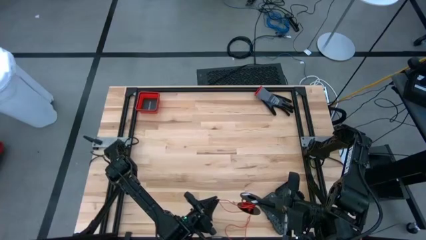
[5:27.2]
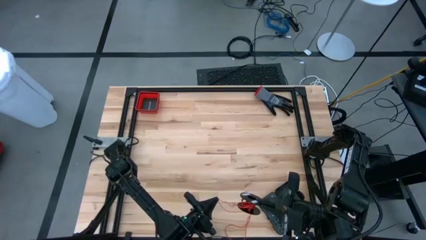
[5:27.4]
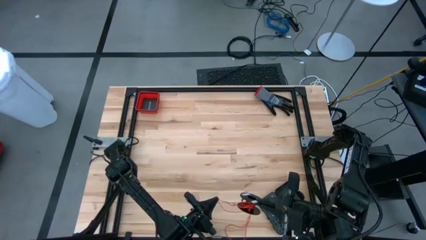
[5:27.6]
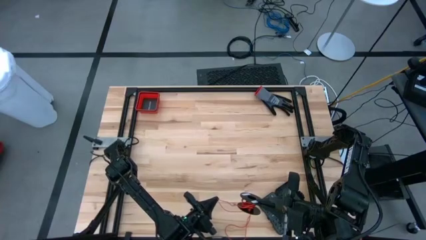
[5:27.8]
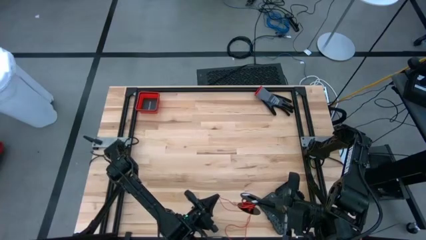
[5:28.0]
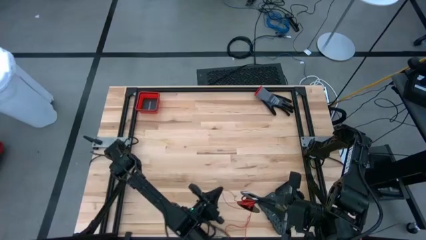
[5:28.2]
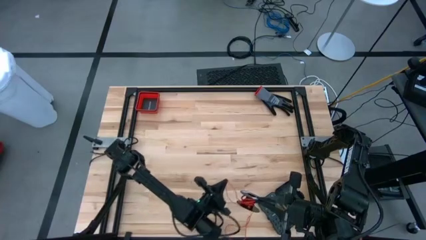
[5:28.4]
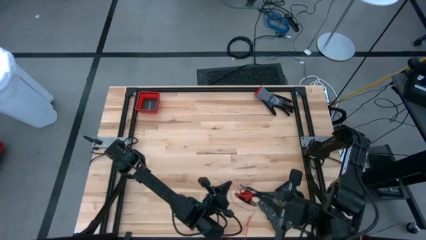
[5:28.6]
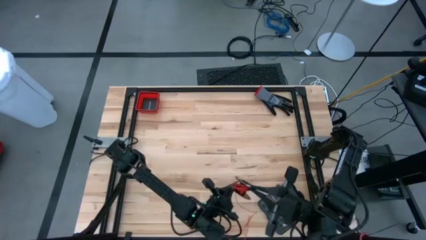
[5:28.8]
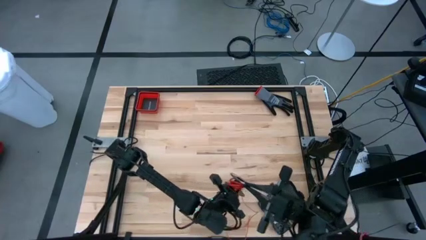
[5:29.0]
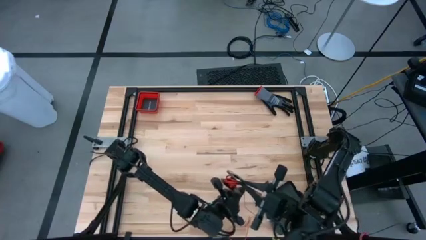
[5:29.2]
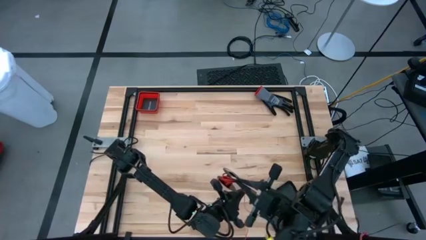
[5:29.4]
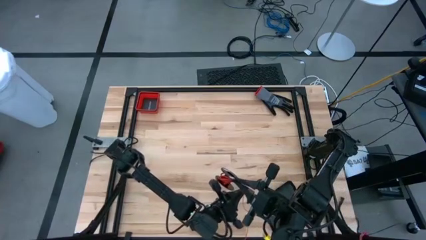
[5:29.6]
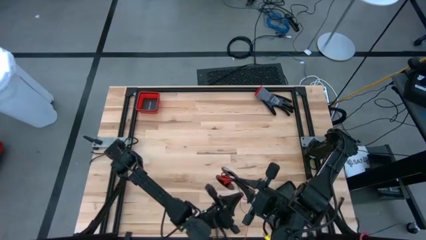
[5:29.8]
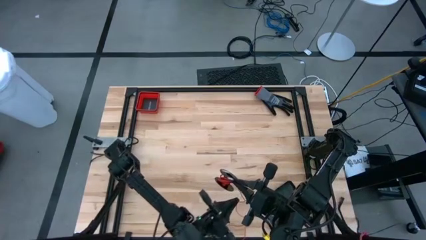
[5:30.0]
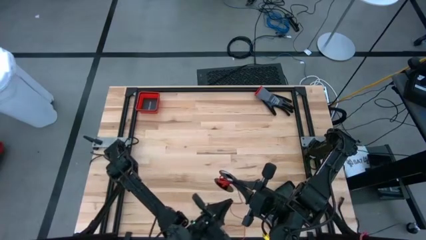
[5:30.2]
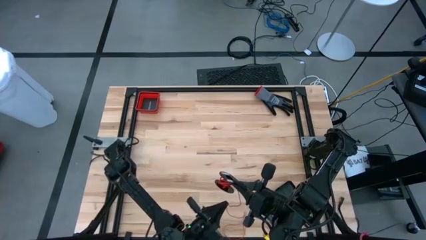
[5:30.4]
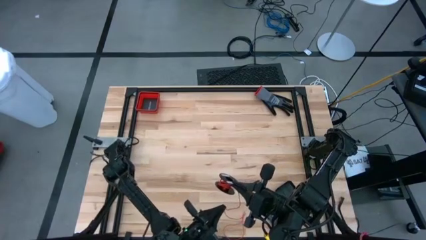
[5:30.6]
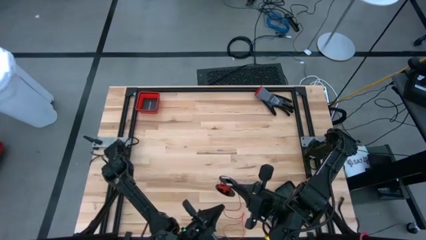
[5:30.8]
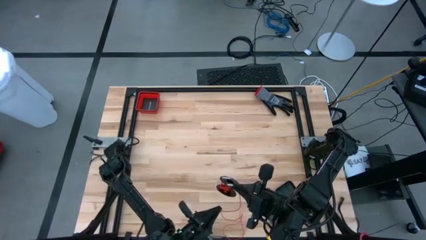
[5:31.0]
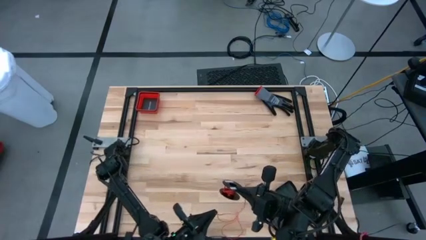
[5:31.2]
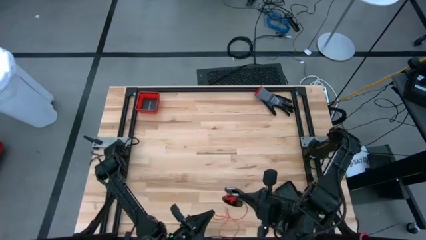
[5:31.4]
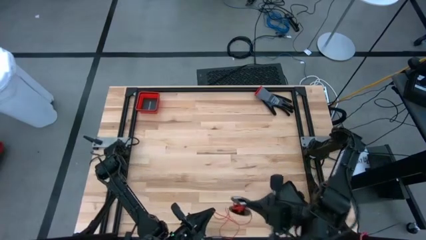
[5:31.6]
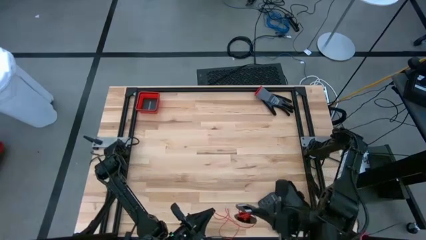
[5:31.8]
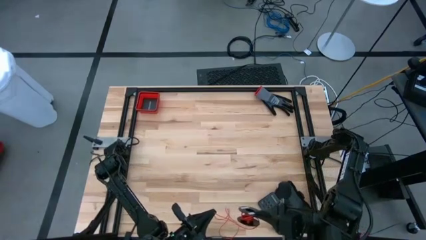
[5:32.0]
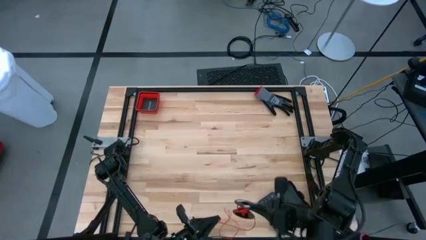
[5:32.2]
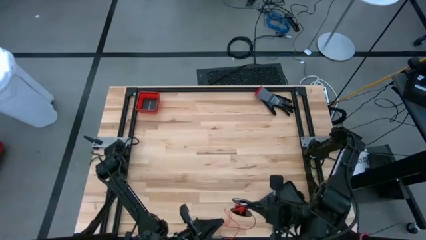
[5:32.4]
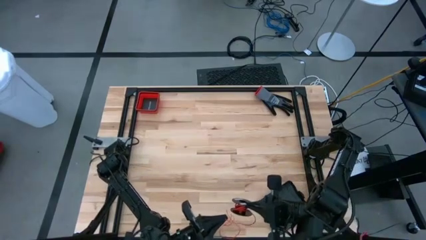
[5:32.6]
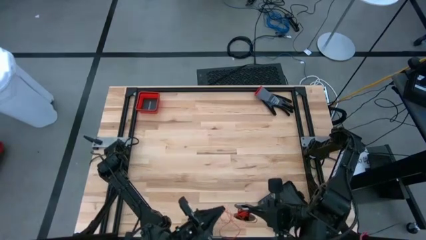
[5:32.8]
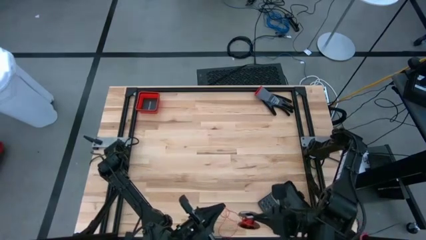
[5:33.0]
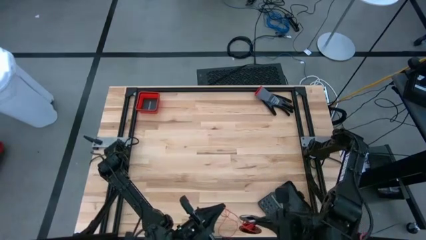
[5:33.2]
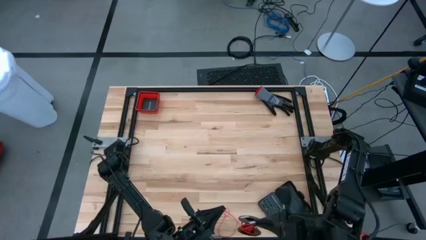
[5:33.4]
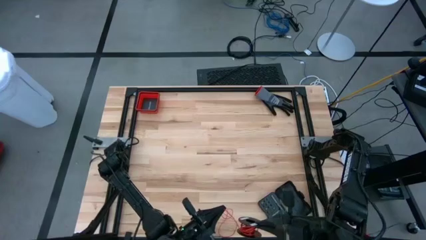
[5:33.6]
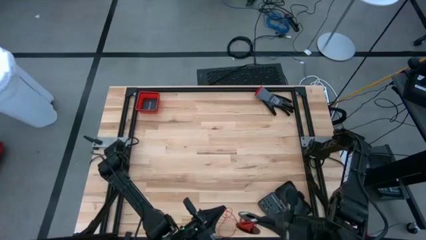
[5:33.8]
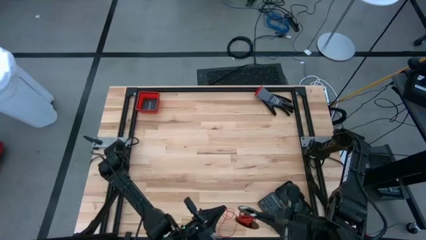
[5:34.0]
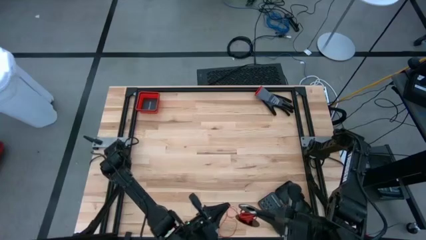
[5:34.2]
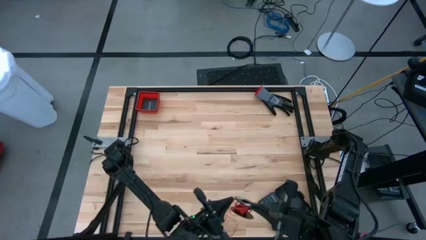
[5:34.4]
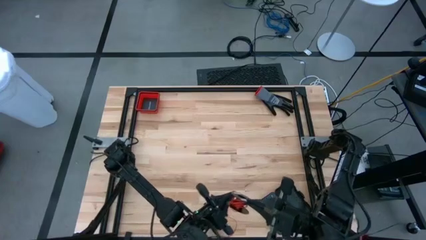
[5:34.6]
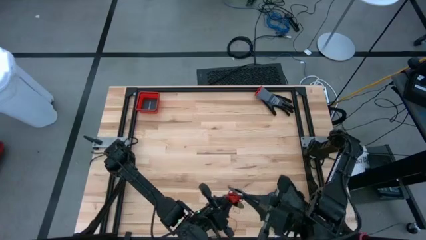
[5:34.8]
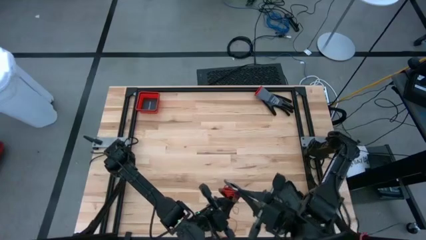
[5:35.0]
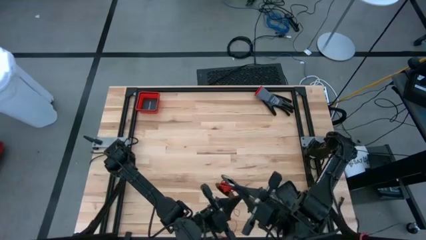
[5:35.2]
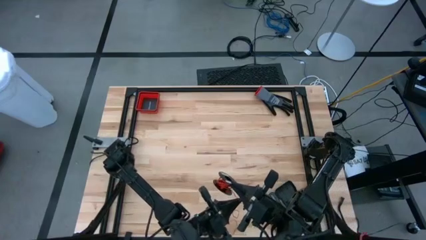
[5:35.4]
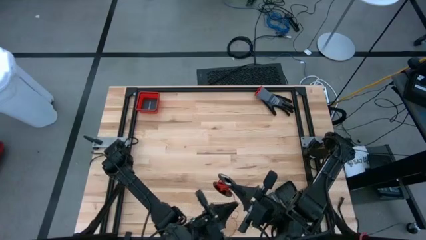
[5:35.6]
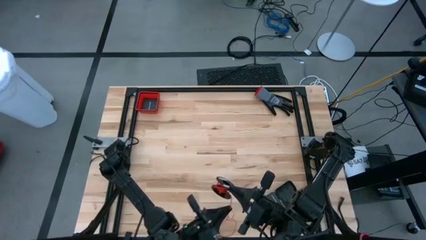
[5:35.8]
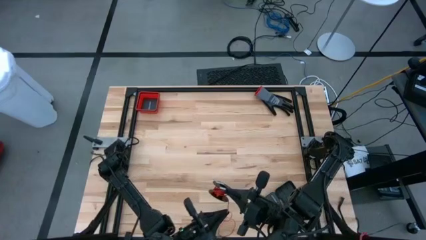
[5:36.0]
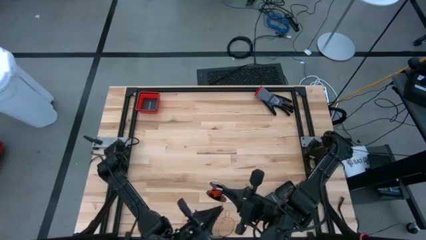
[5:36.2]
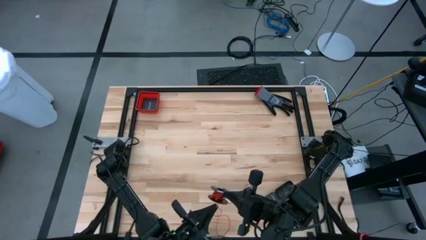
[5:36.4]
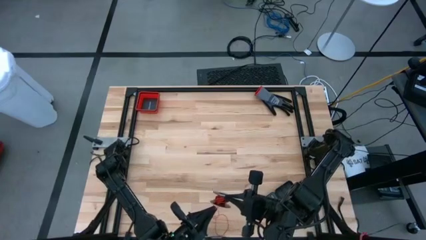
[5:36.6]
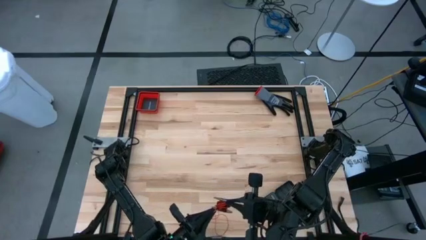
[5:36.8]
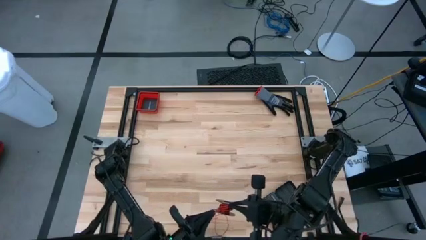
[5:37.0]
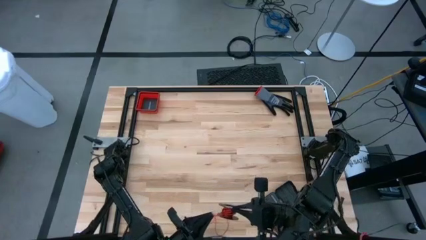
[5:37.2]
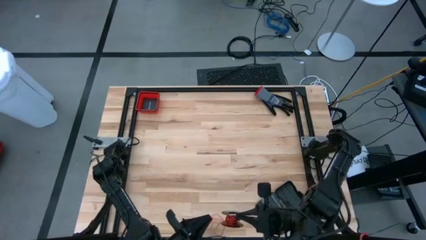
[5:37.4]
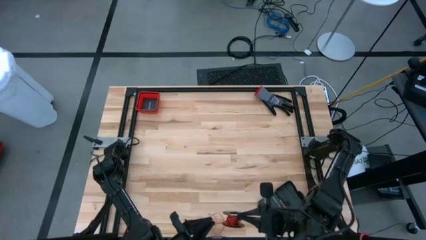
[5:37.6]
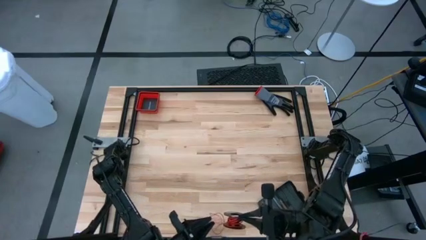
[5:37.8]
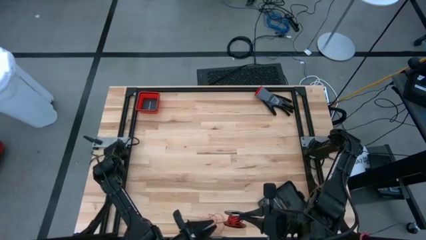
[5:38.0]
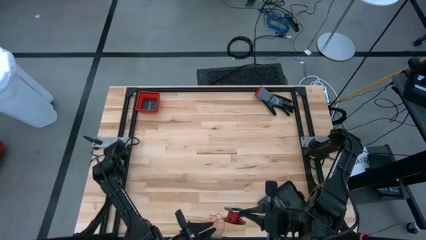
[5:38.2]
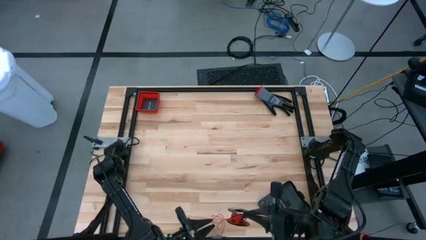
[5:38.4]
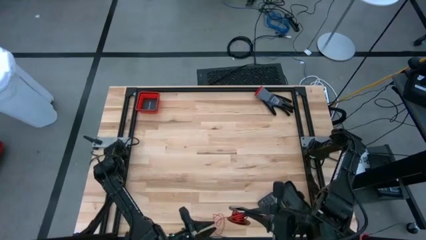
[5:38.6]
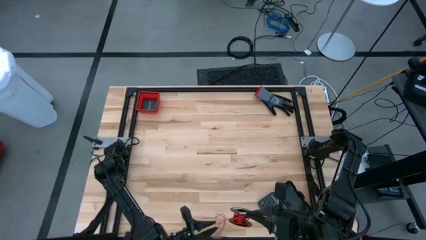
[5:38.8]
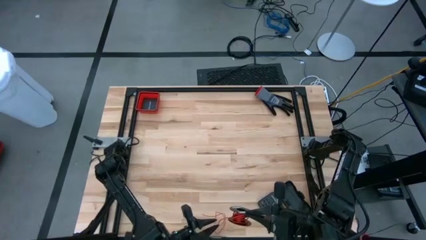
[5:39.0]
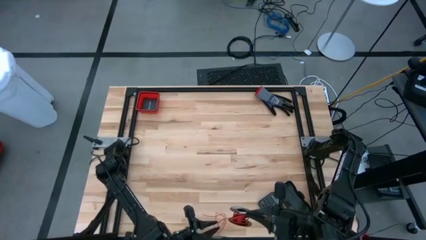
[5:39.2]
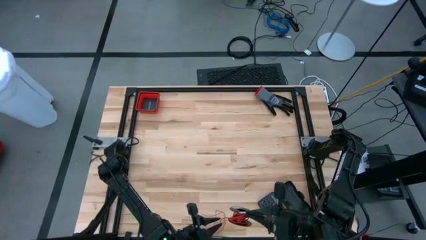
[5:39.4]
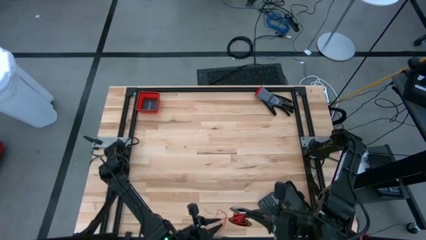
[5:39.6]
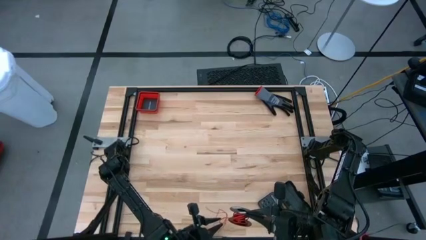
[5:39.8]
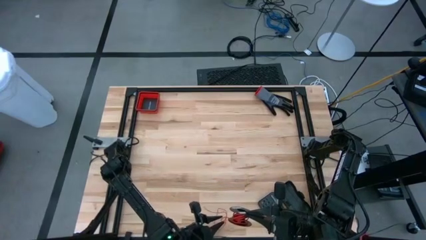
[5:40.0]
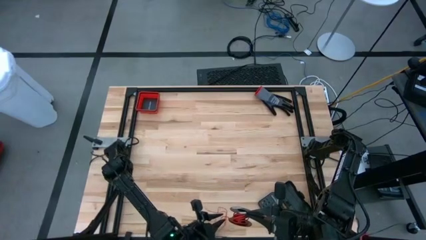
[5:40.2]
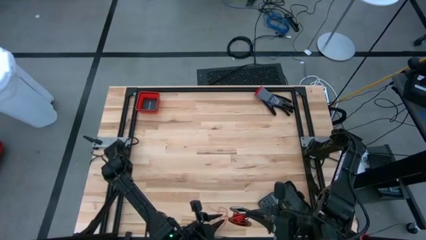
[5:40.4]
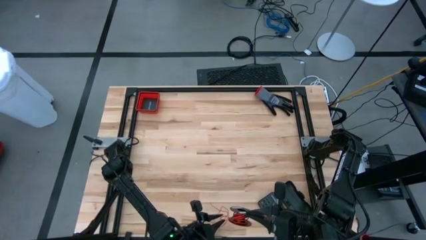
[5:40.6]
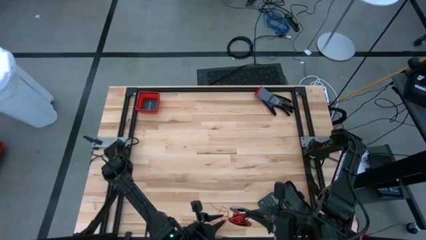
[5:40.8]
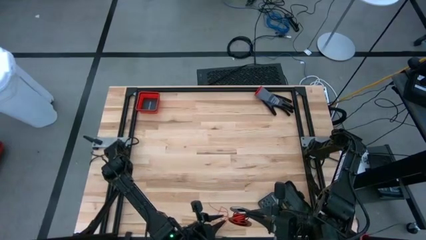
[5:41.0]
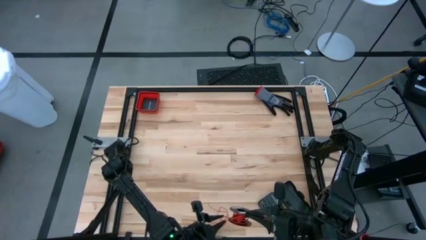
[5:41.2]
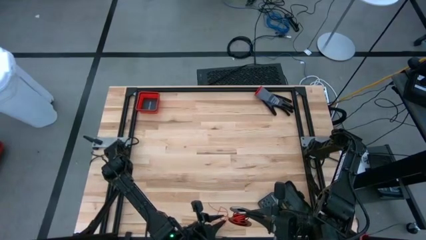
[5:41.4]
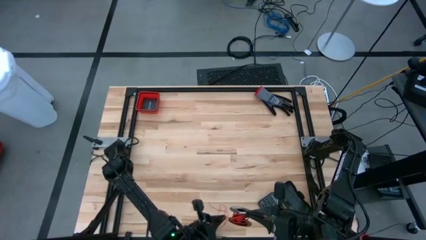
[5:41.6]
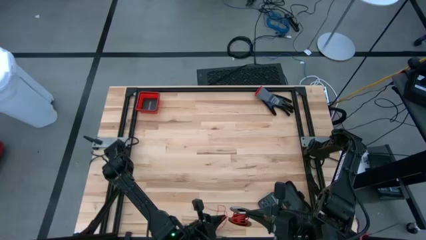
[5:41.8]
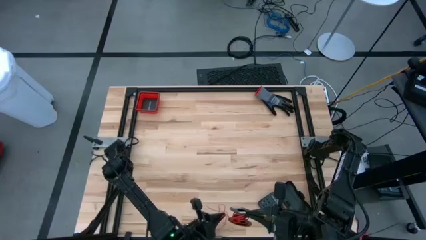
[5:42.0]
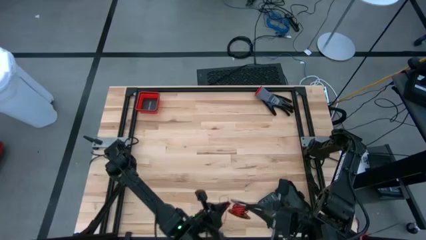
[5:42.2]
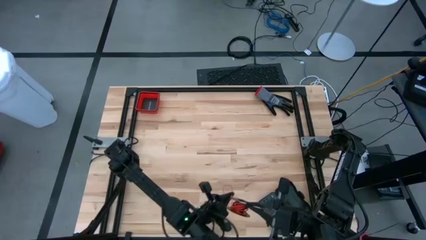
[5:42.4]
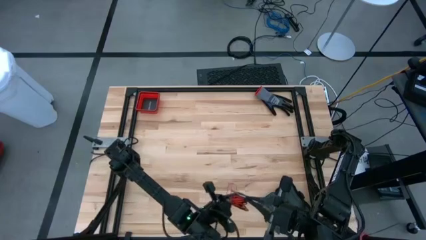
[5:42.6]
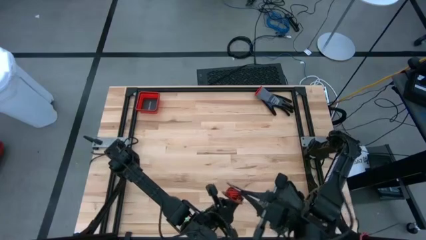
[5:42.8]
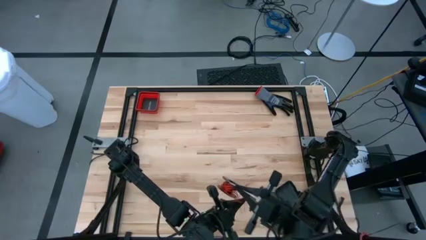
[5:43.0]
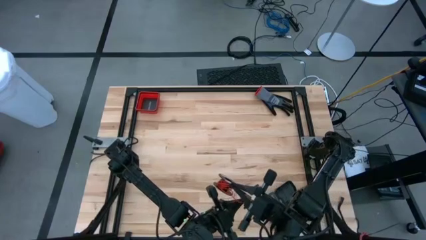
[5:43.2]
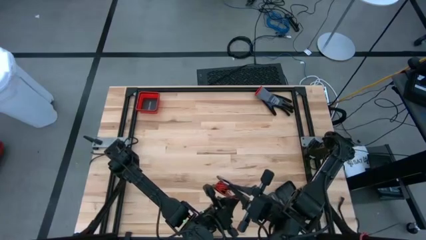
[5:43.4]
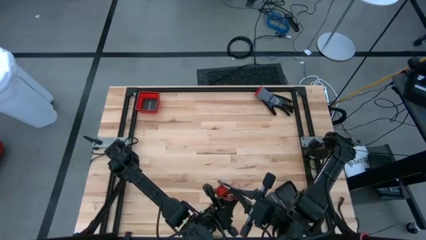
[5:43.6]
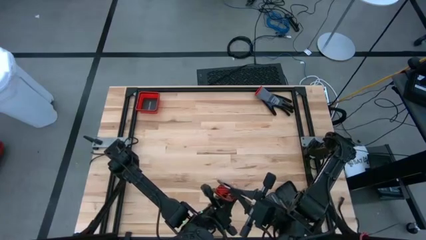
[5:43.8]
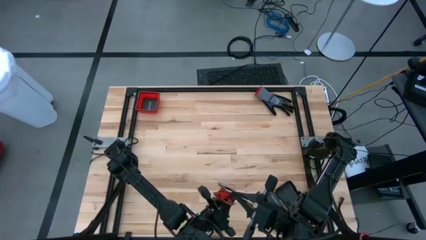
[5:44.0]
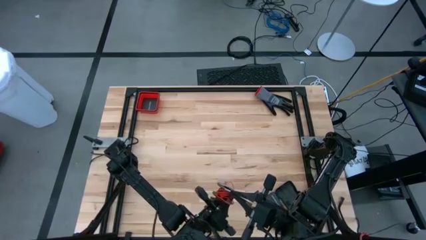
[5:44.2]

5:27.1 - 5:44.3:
Task: Coil cords
Coil the red wire onto the spool
